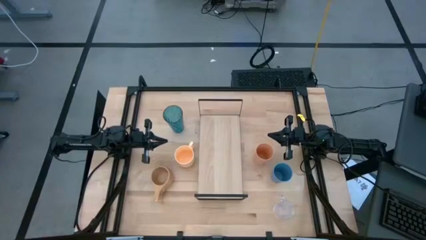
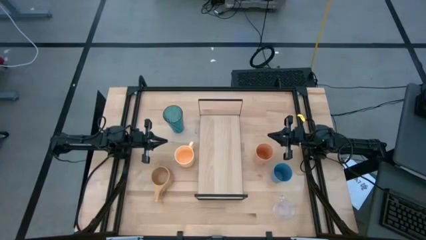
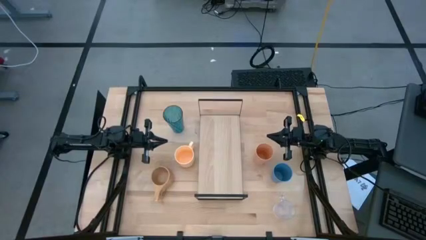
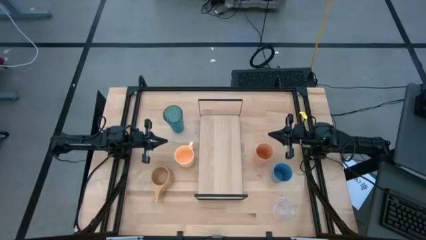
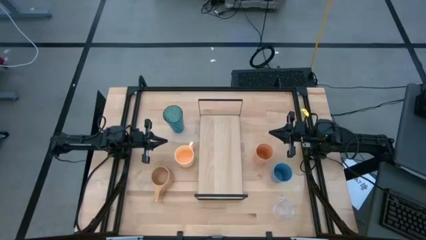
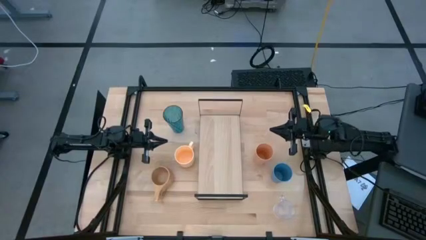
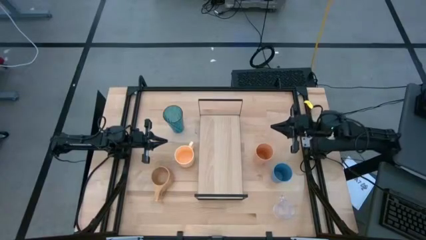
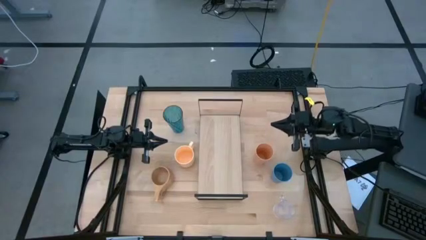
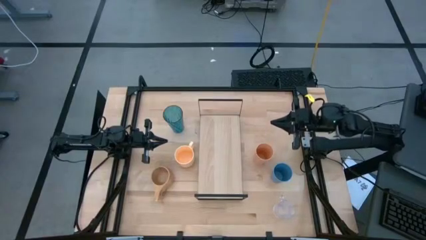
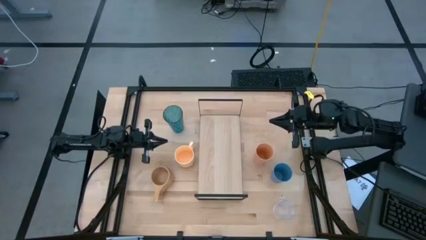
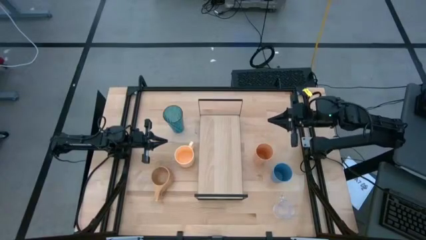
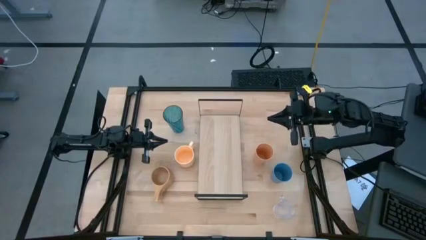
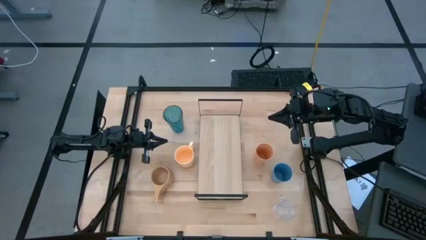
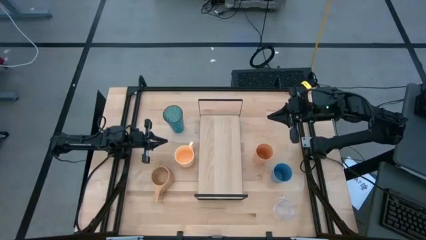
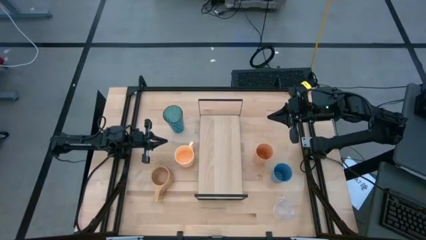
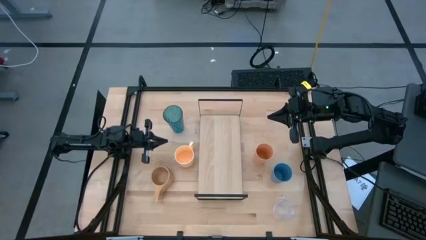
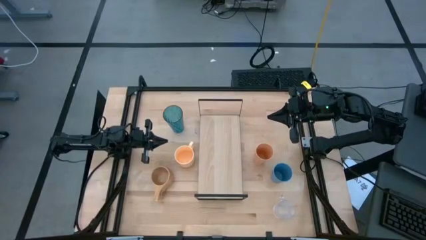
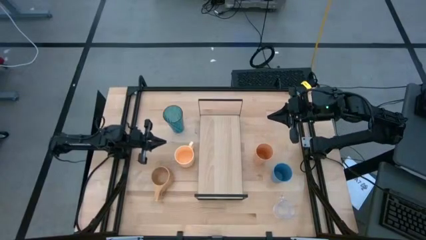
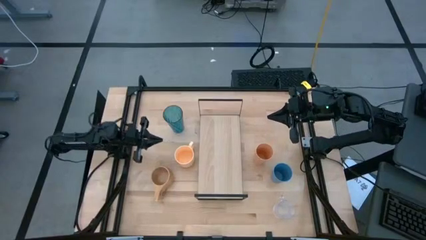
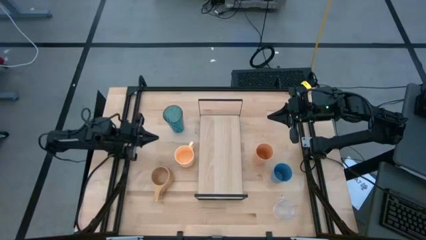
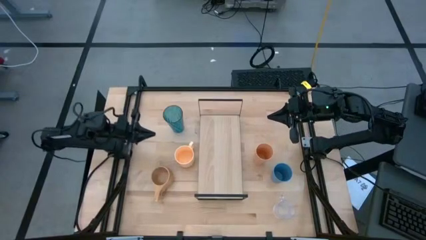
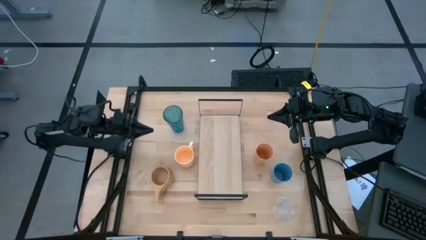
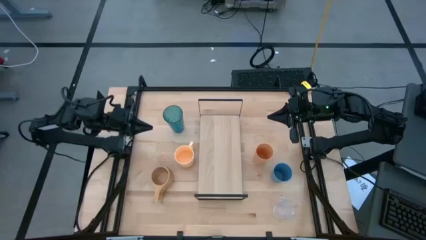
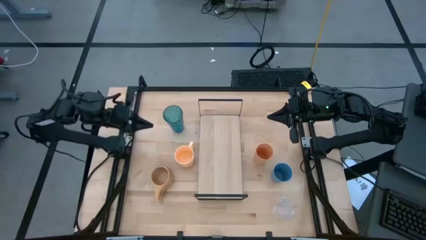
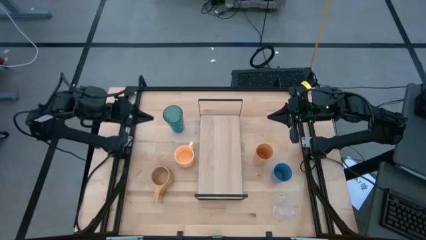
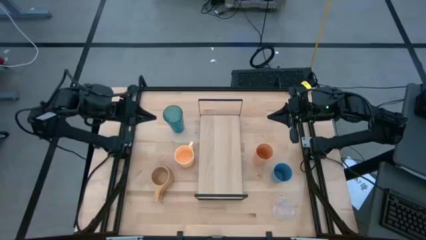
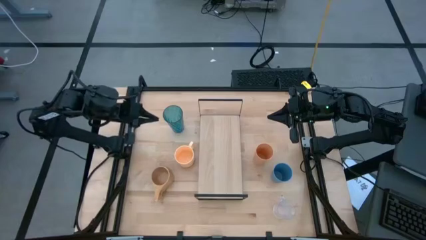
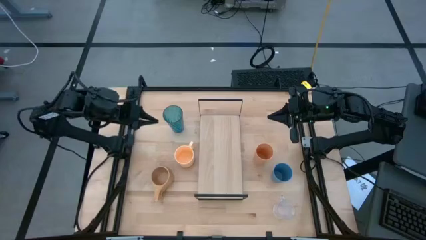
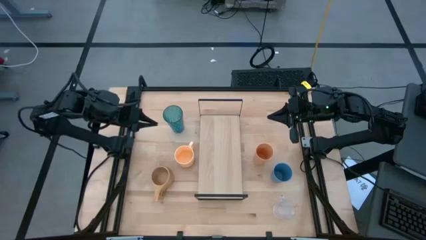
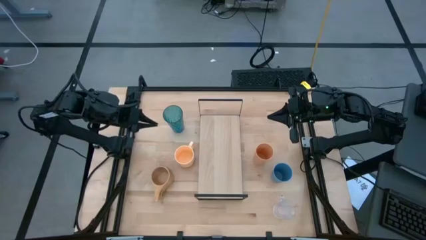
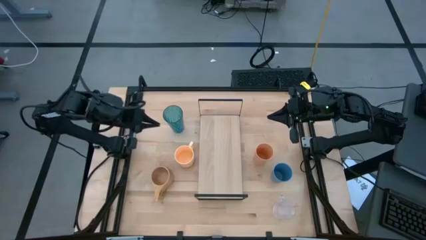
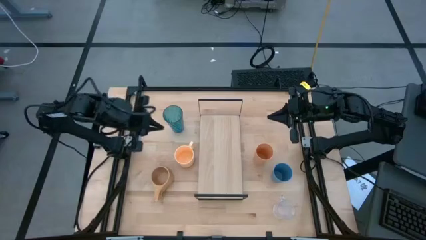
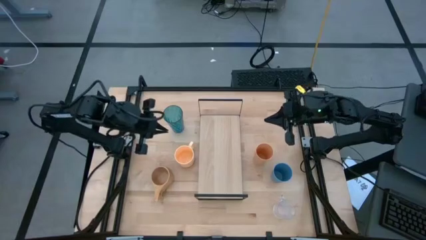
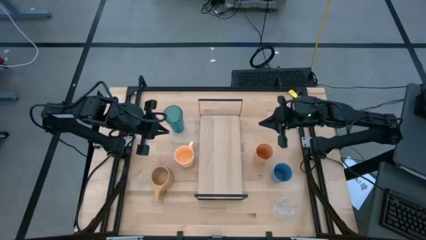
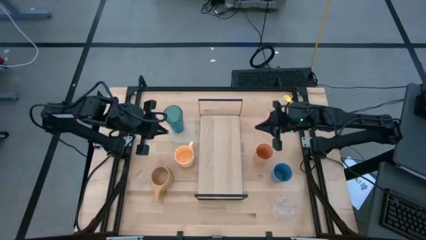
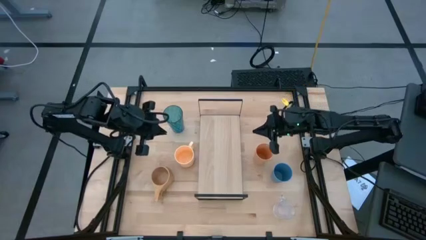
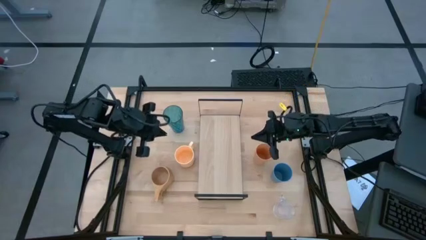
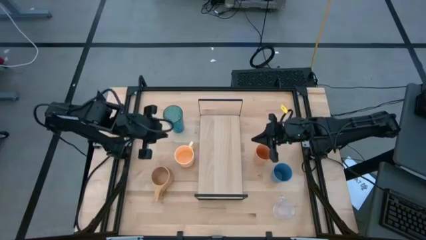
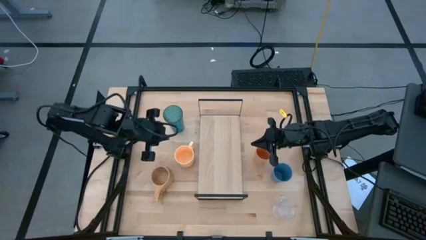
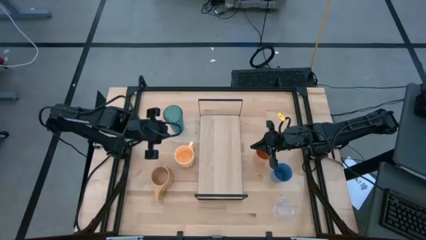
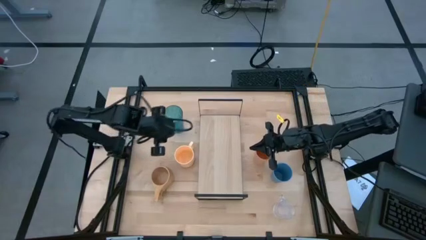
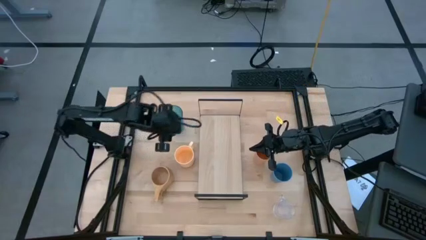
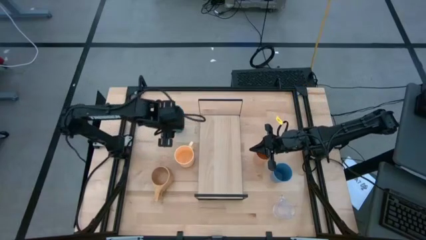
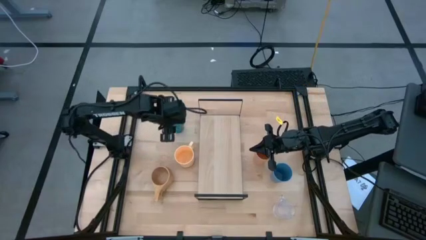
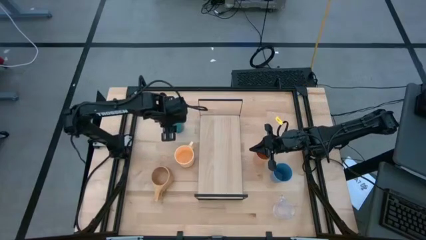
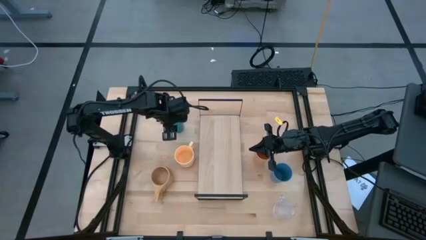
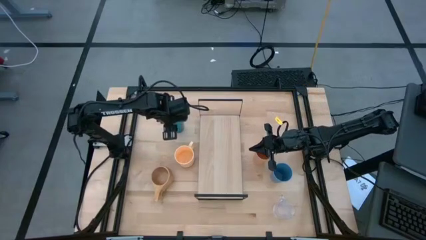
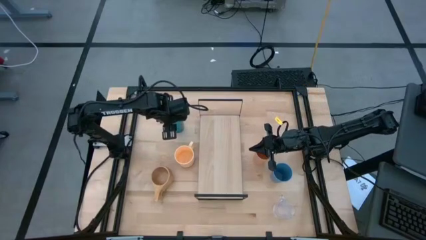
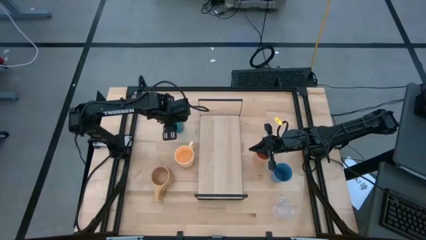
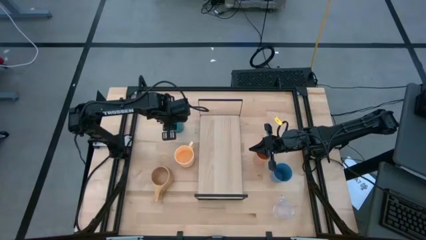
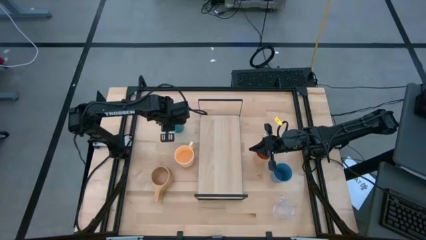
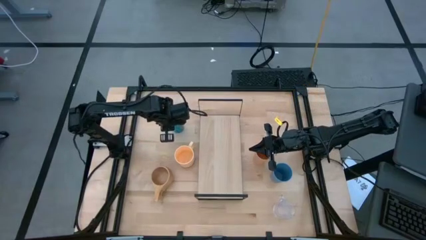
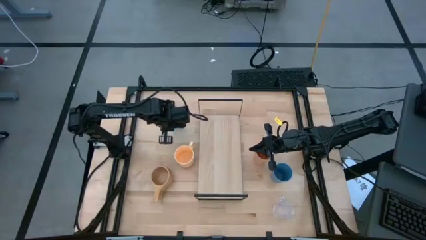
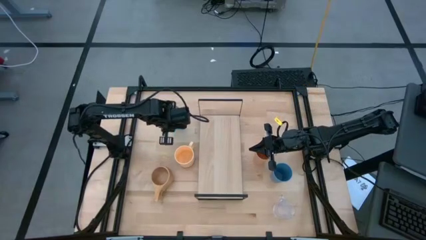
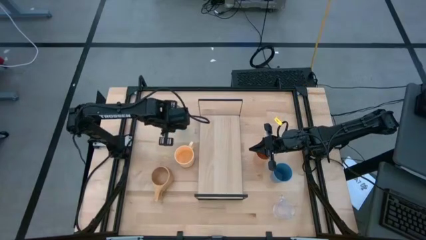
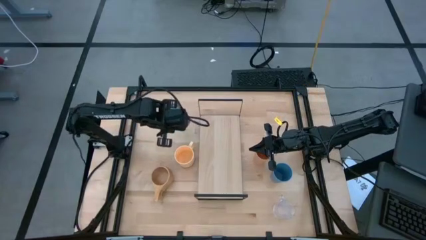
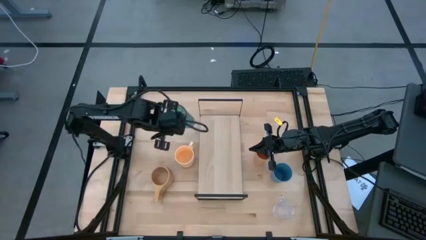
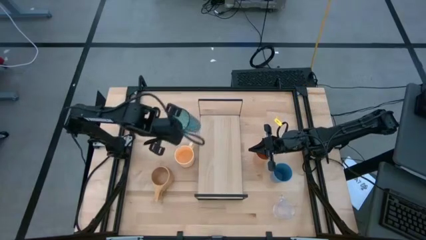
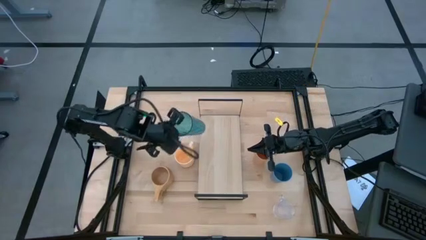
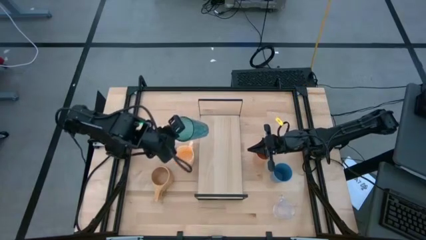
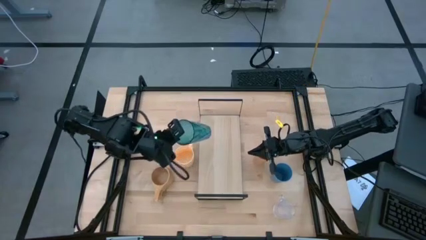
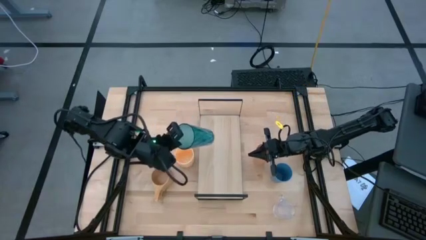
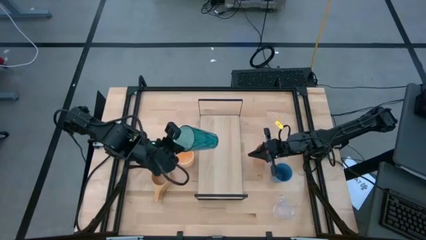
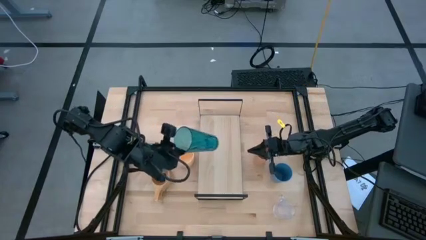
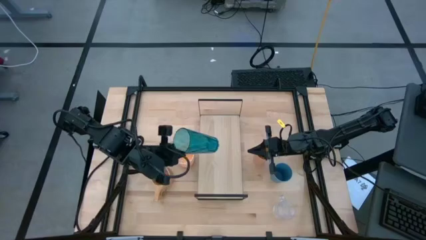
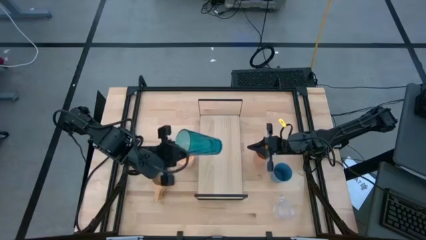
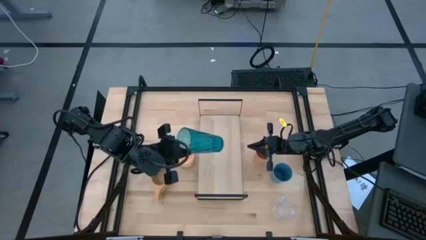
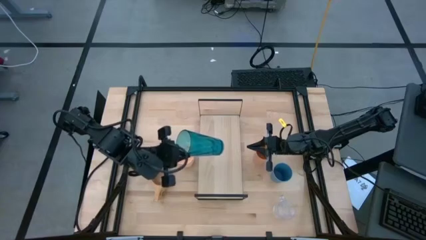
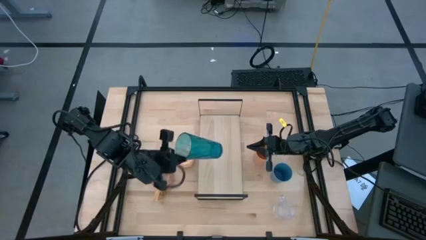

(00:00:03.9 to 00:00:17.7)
Task: Stack small to large cups/mugs on shelf
Put the light blue cup on the shelf

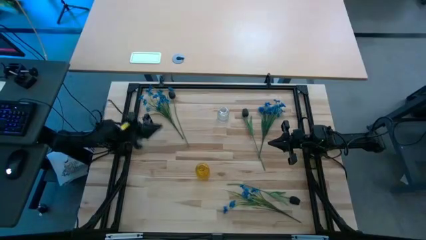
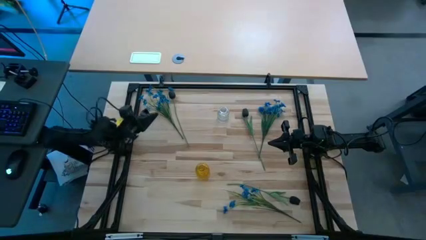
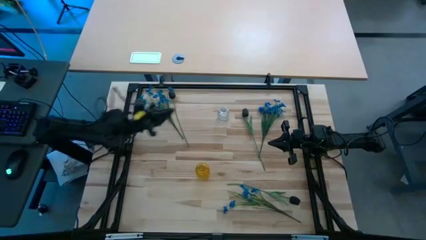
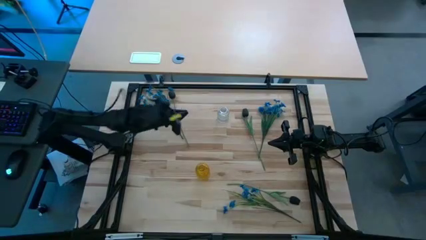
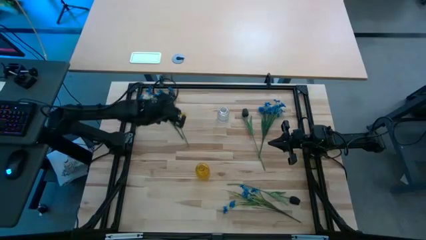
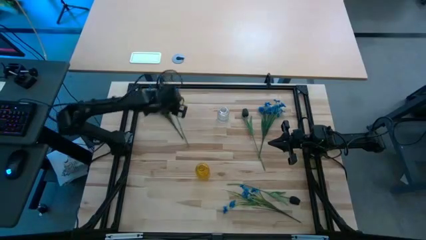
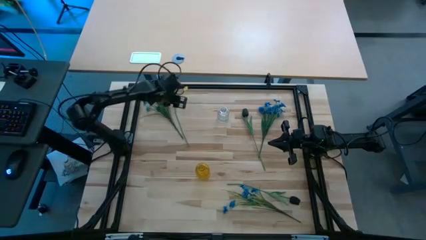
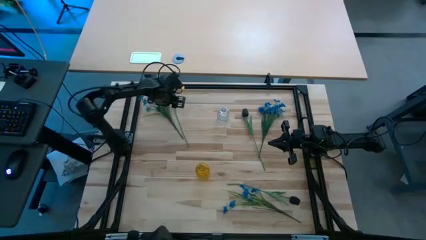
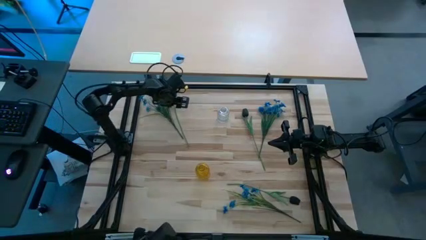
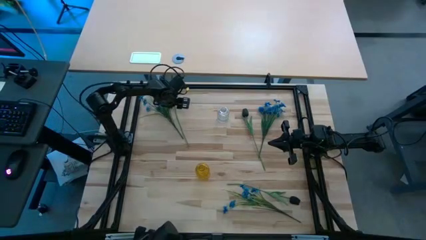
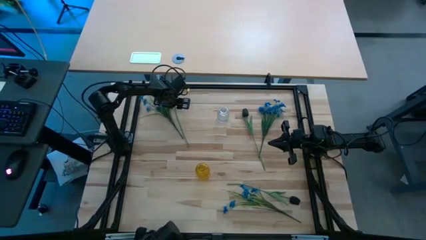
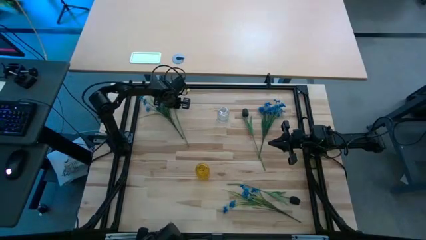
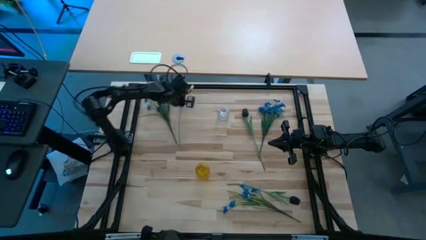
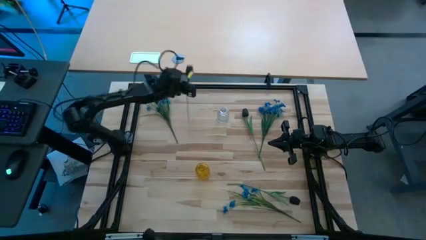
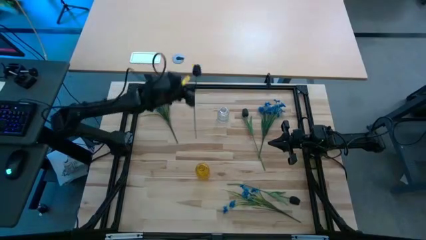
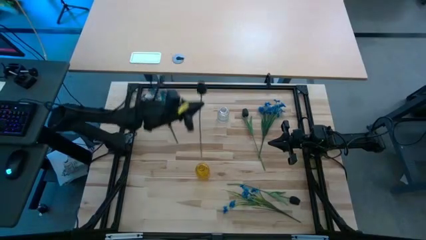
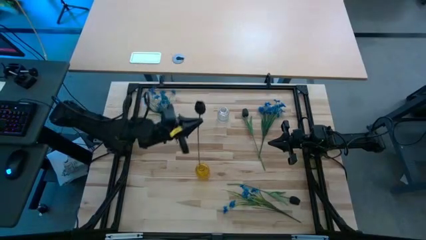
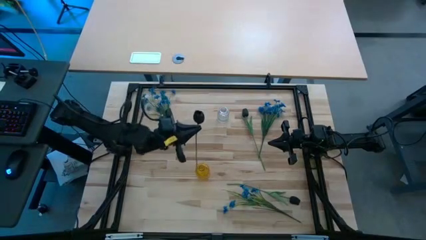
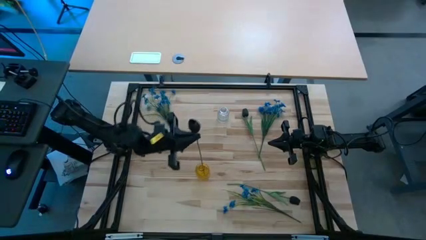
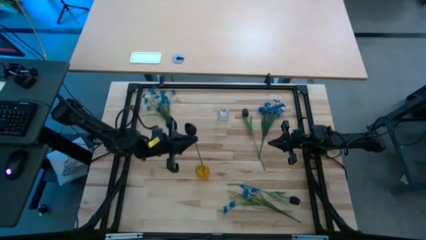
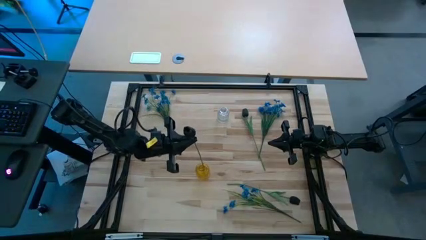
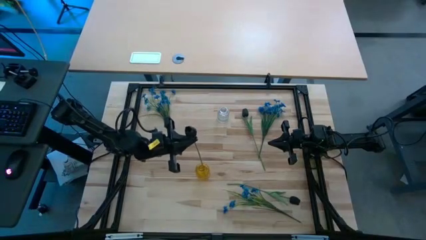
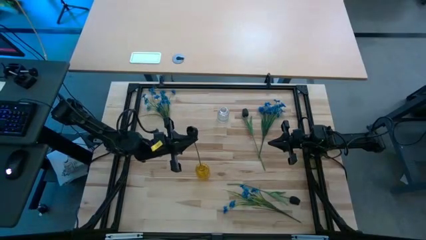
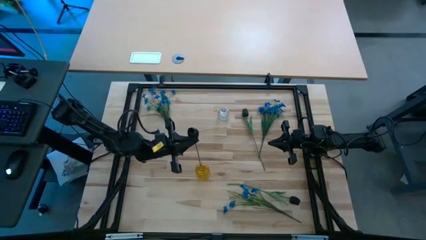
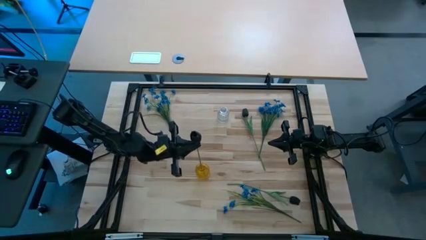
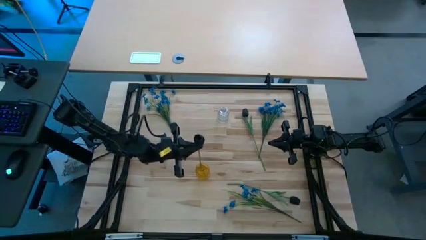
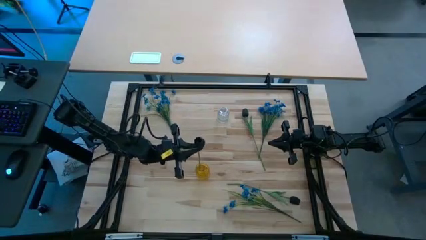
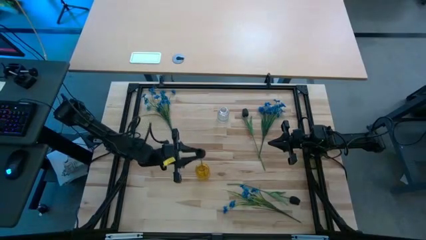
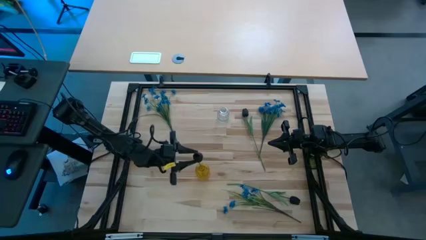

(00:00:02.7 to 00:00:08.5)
Task: Sort flowers into vase by color
Put the top left black flower into the yellow vase
